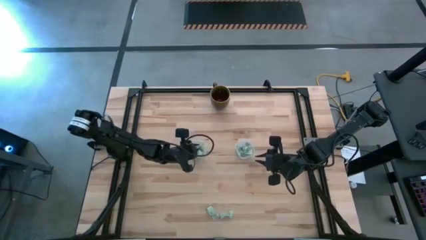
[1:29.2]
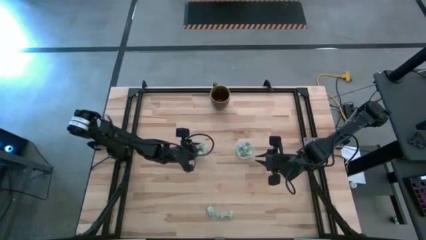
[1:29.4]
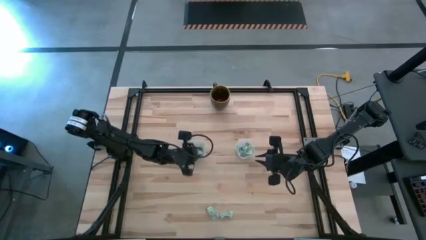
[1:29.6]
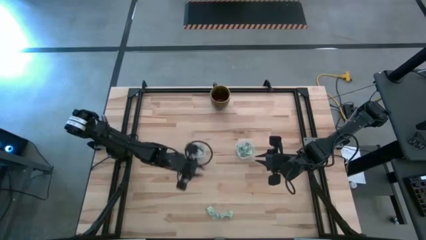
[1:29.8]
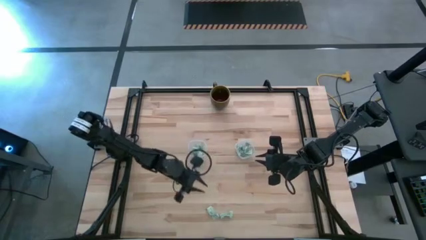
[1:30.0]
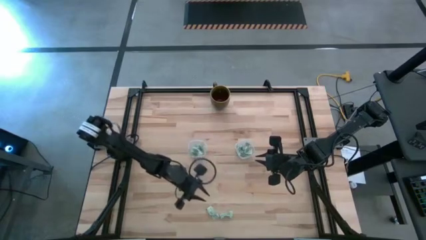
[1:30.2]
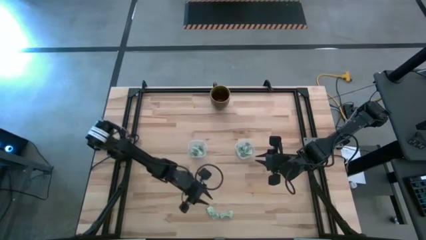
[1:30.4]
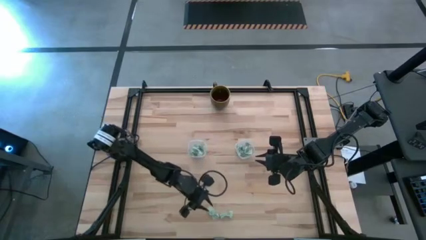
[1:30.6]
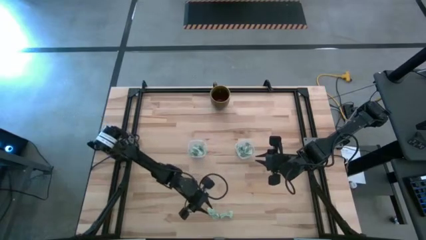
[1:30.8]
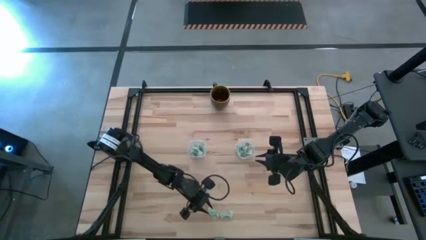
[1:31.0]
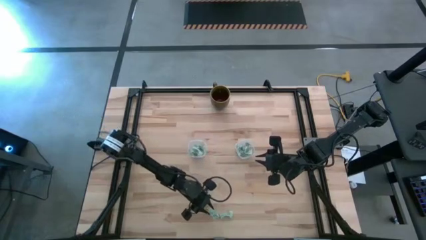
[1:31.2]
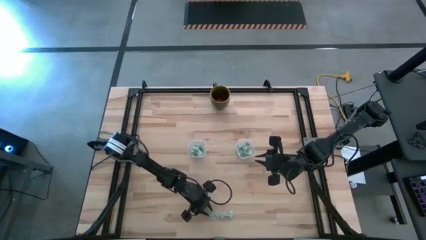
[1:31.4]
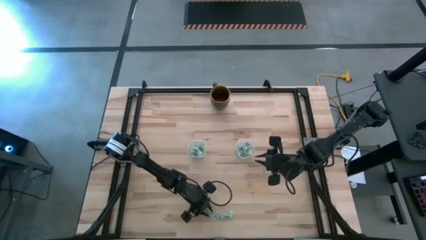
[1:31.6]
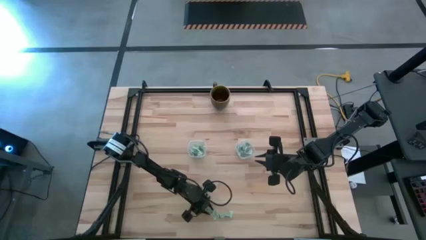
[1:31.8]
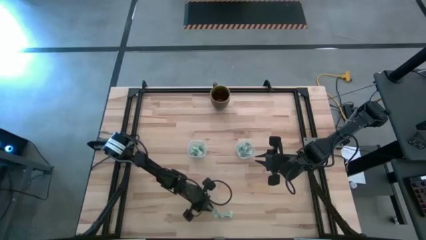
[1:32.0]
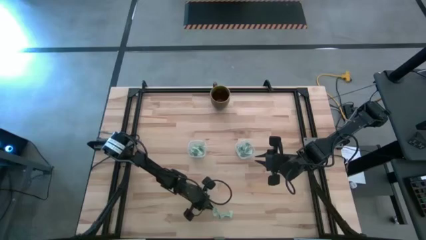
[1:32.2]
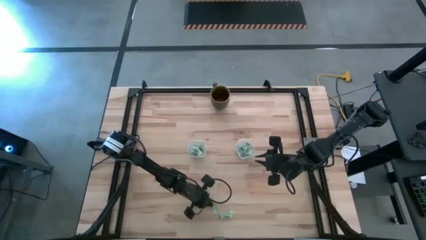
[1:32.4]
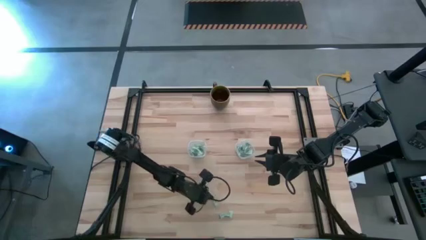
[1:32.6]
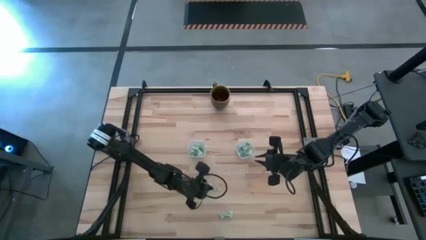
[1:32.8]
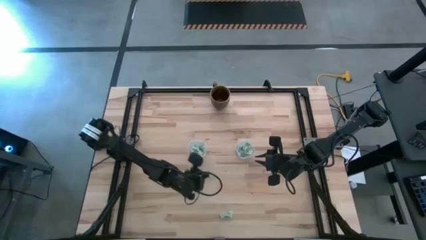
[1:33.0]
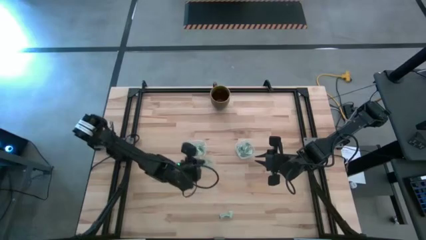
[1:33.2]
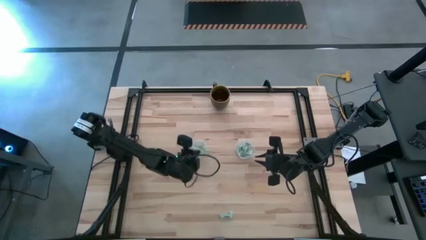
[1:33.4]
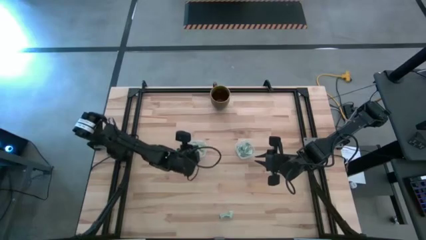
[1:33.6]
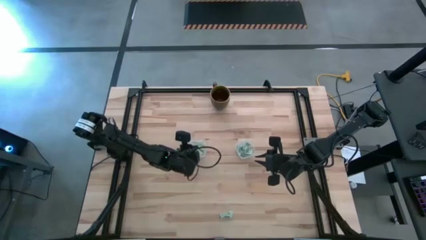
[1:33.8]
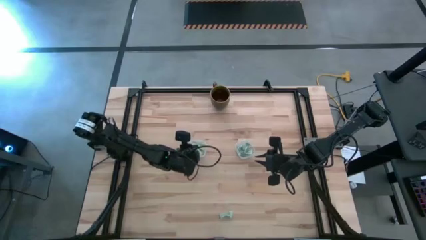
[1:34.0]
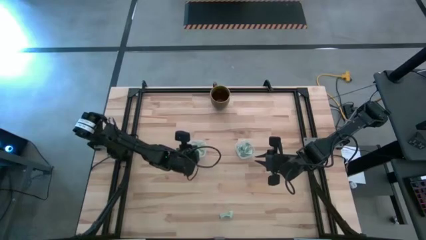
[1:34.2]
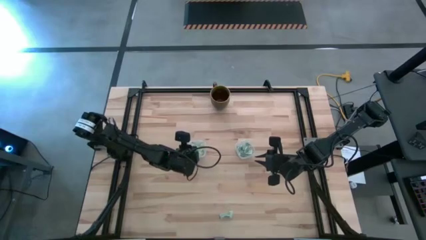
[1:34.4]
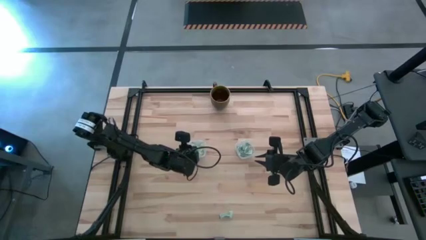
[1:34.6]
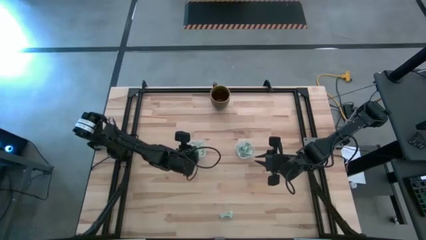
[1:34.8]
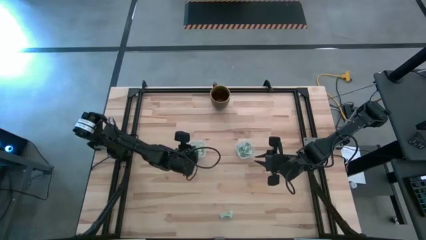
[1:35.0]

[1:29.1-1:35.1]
Task: Pick and place Stevia / Truvia into bins
Put the white stevia packet into the left transparent container

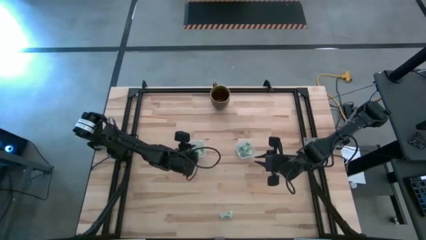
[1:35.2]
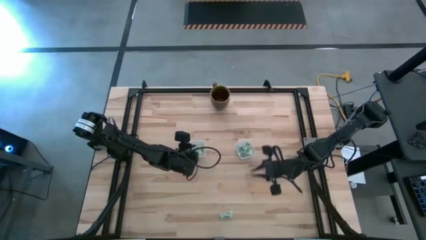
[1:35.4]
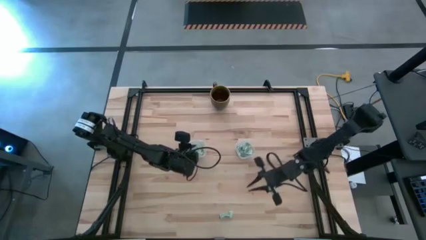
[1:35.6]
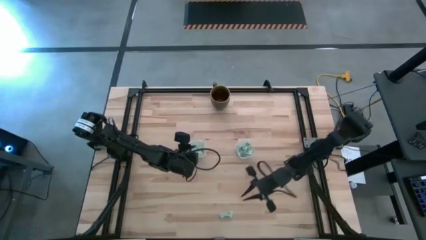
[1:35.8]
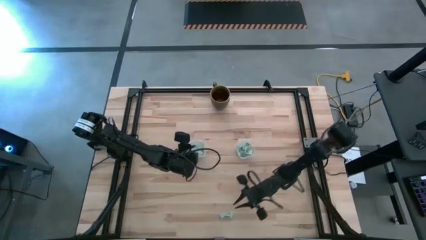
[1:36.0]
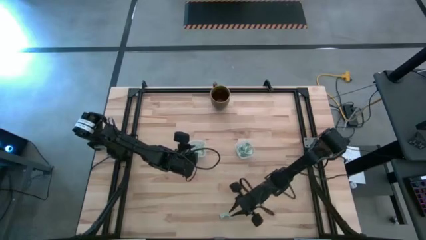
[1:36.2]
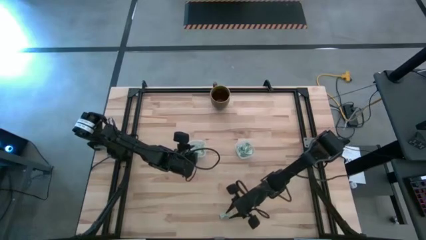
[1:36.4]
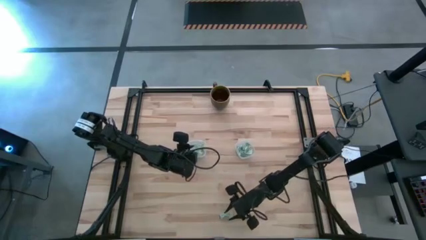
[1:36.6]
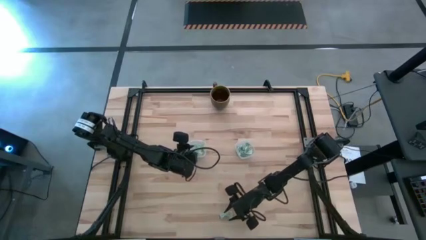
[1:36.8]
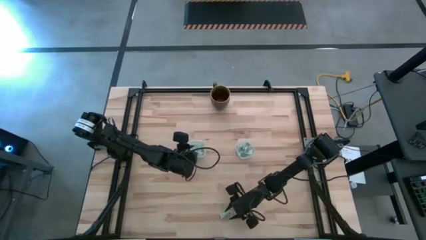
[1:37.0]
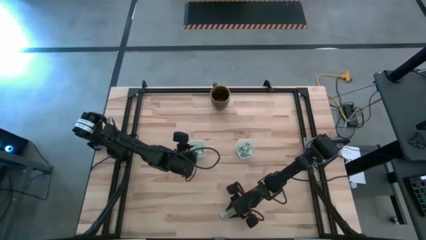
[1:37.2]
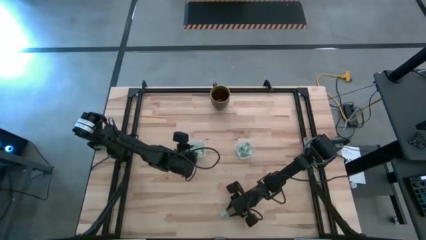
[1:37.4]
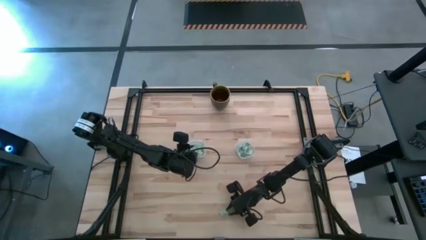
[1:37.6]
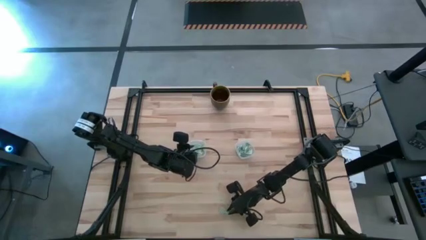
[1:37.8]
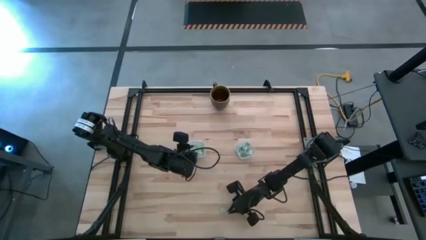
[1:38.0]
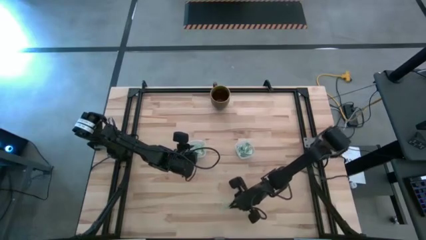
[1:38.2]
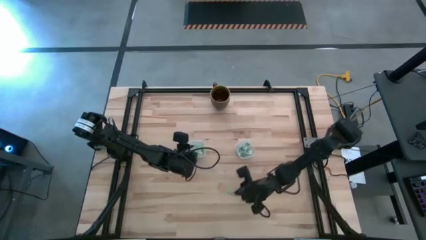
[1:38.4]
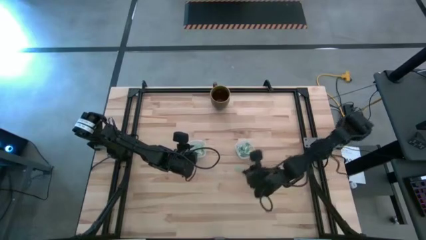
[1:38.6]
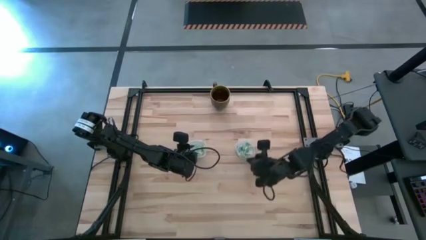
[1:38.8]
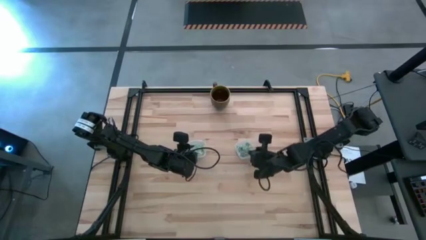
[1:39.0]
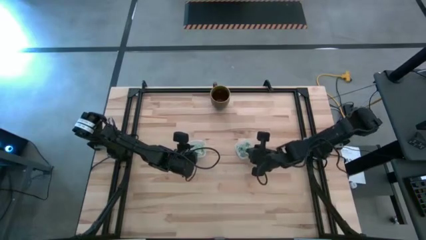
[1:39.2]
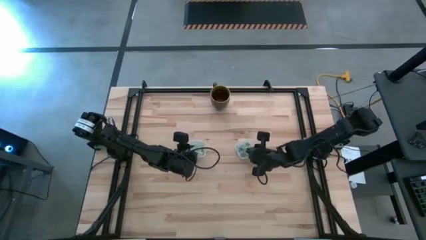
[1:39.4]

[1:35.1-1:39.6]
Put the white stevia packet into the right transparent container

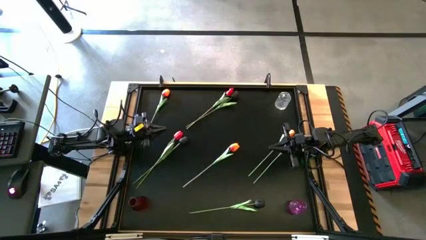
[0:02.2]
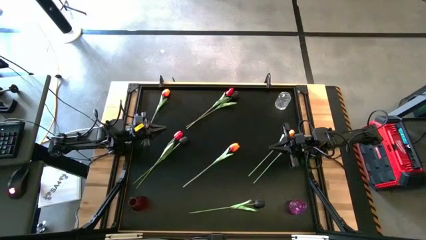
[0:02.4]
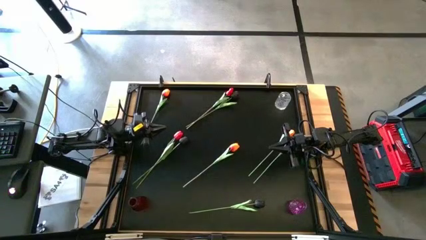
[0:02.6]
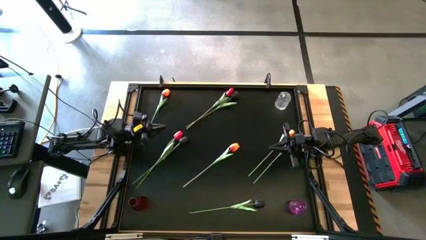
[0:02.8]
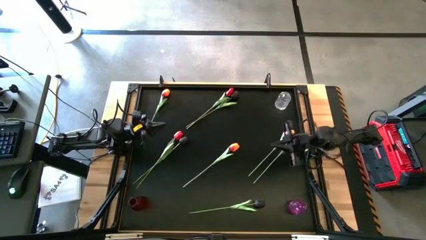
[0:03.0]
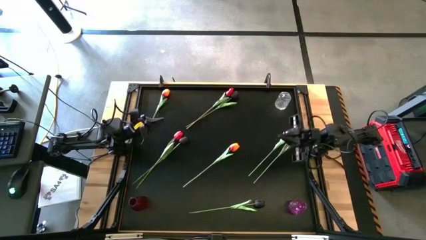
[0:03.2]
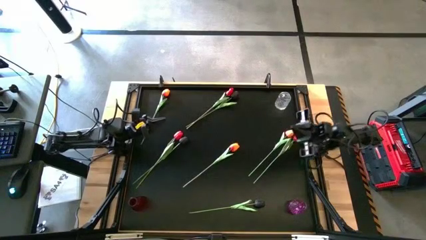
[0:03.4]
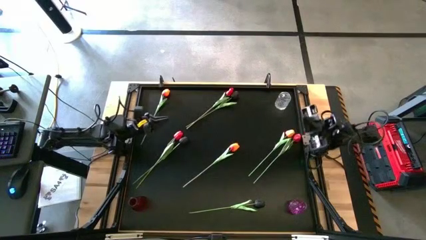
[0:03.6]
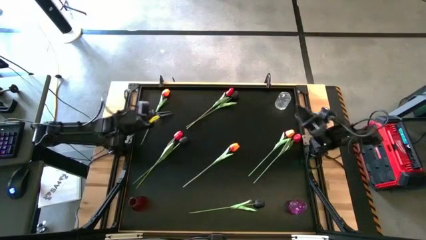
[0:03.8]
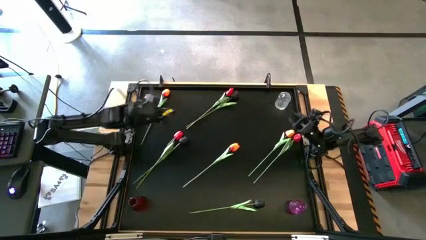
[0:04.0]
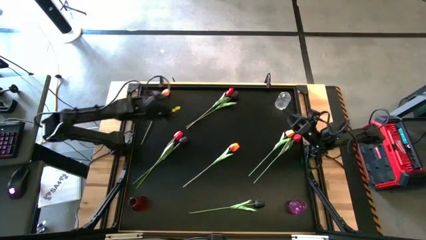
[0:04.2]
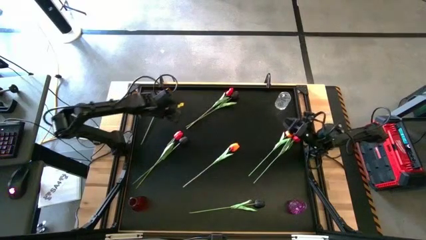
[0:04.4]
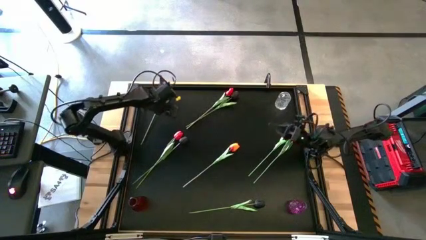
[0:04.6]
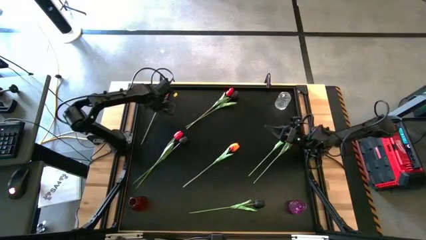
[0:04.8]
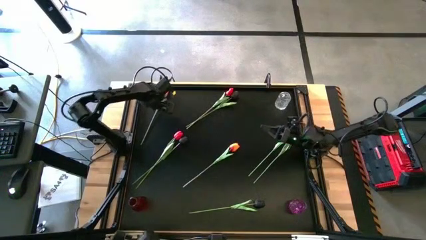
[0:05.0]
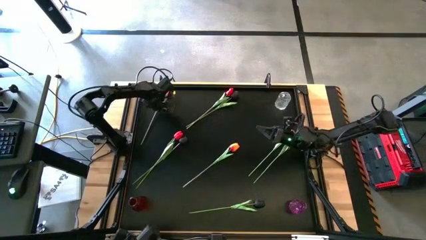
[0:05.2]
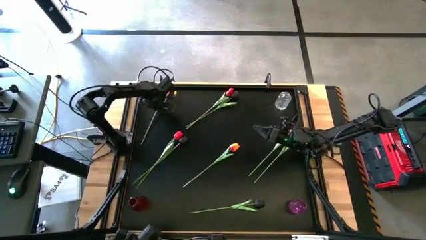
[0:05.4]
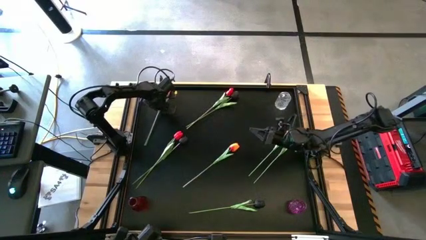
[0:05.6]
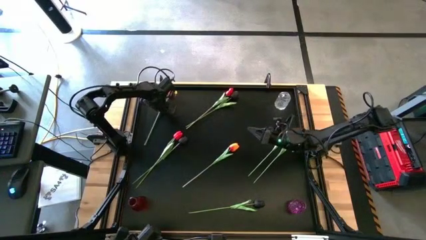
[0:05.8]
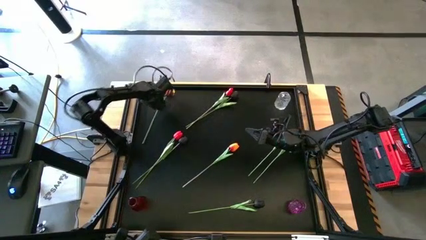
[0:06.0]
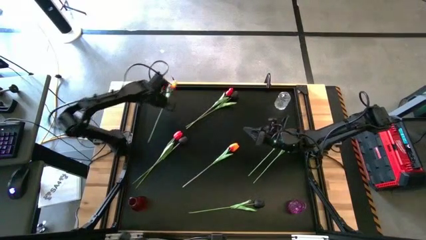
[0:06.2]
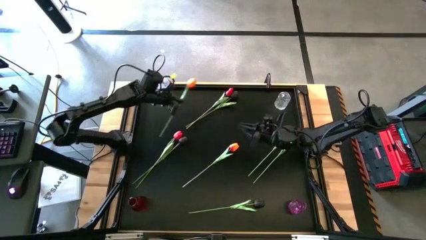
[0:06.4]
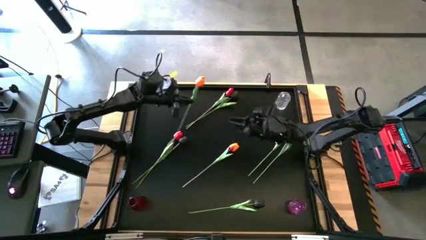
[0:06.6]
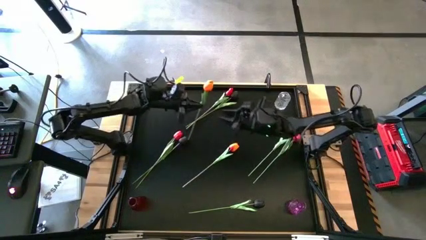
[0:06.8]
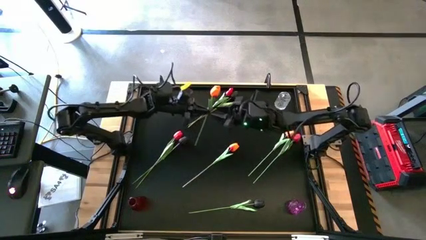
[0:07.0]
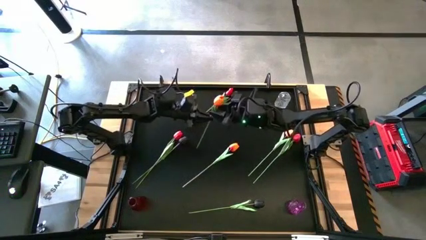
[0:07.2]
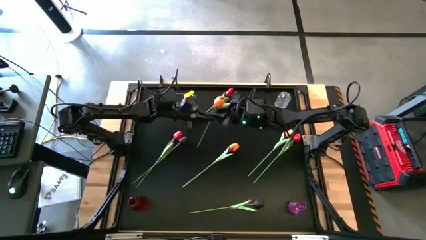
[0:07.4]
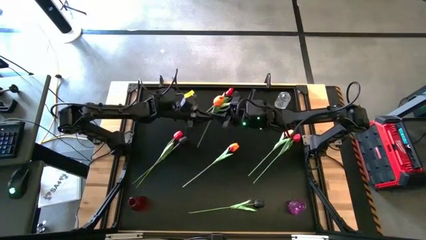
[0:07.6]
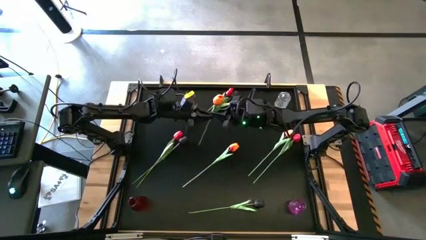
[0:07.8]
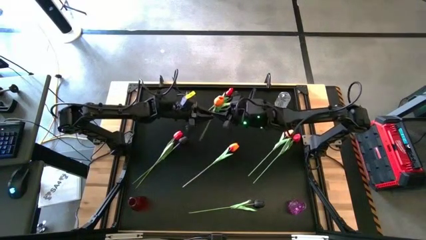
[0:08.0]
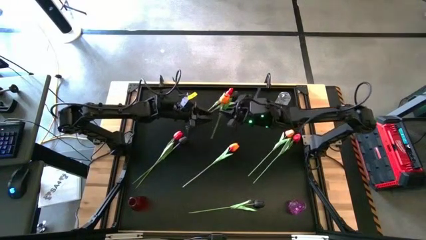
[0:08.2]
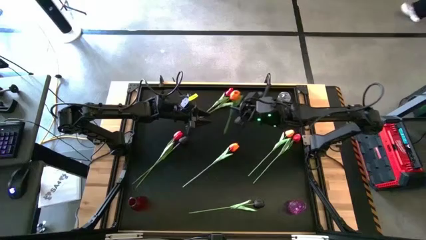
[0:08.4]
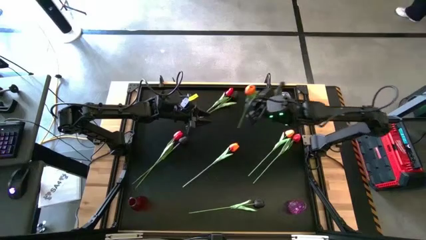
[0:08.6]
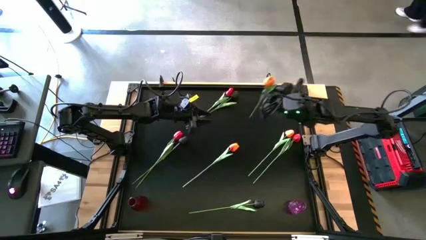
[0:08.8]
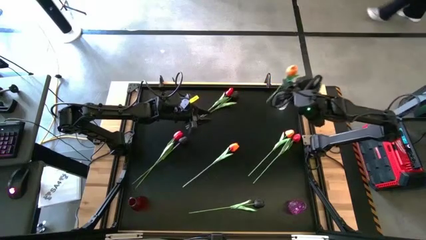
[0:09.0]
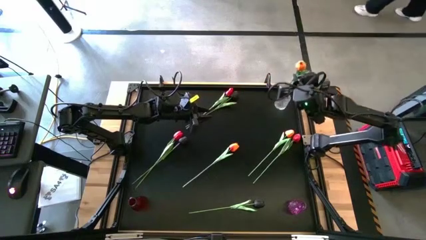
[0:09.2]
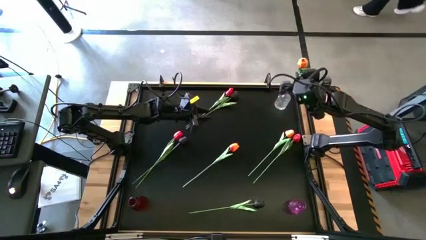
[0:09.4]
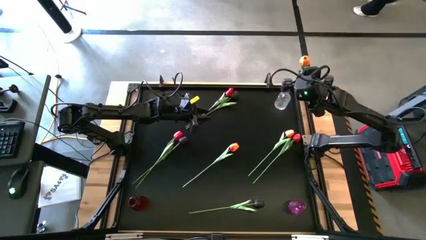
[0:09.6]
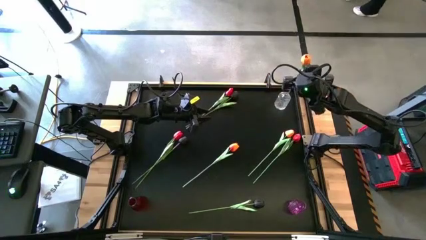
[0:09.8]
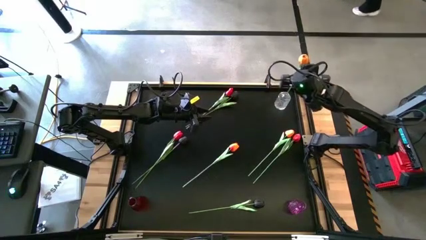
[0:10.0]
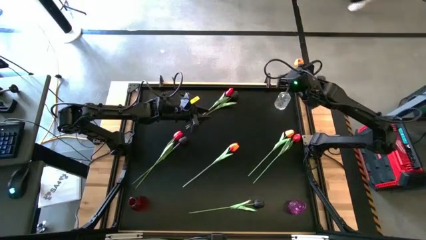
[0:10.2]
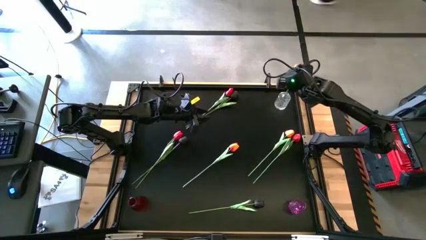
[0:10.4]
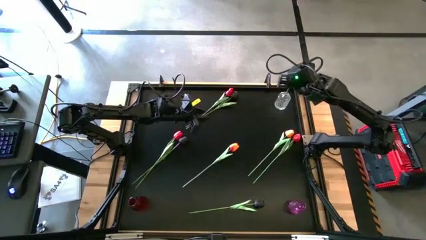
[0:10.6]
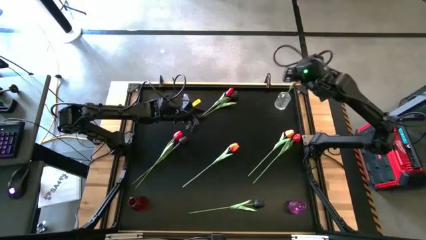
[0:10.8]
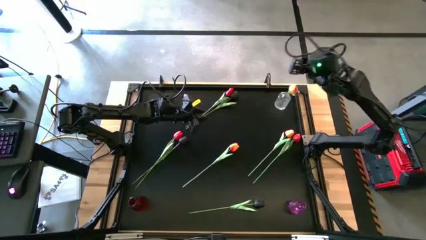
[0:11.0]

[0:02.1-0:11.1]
Task: Sort flowers into vase by color
Put the top orange tulip into the transparent flower vase
